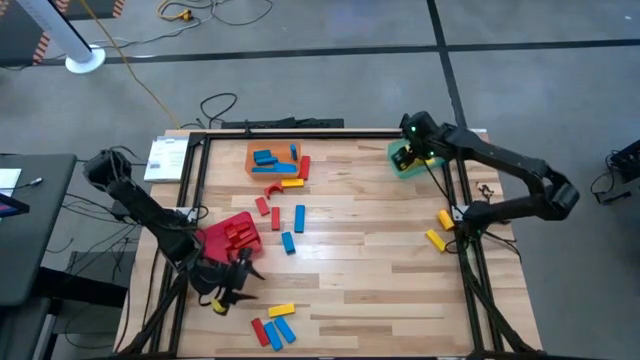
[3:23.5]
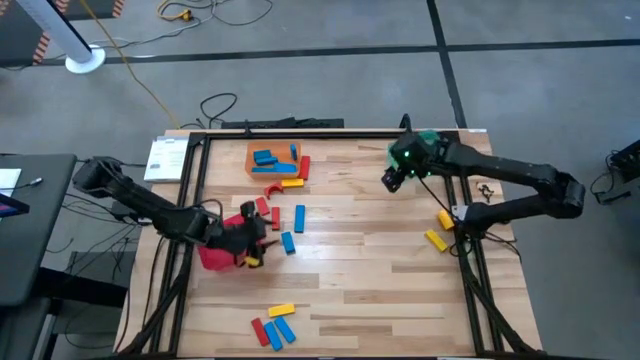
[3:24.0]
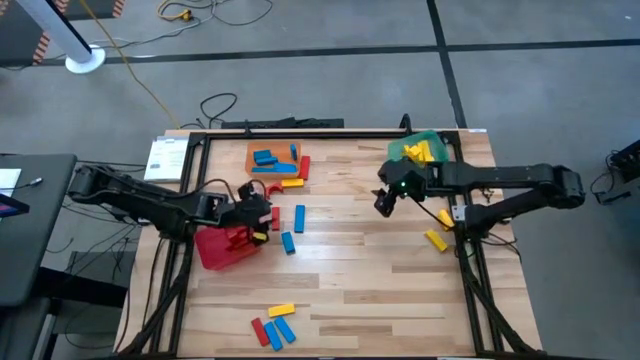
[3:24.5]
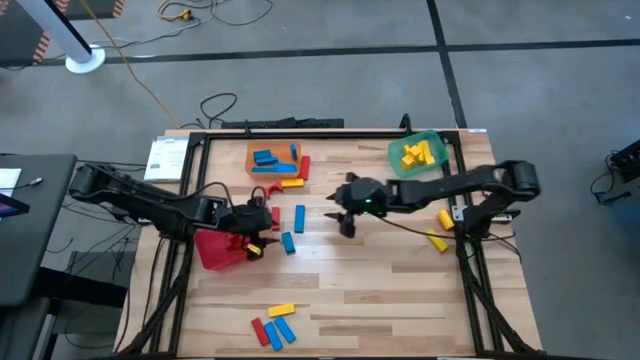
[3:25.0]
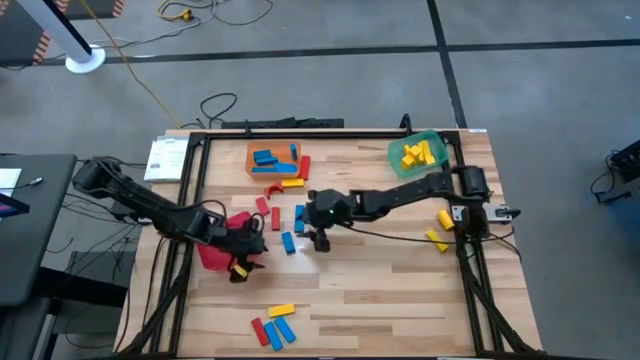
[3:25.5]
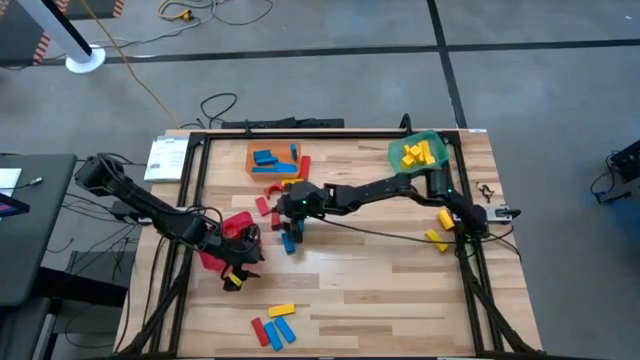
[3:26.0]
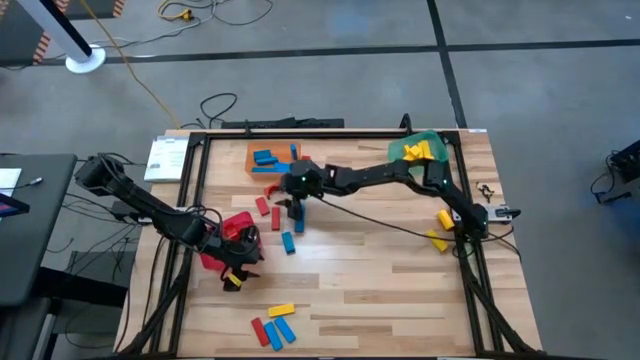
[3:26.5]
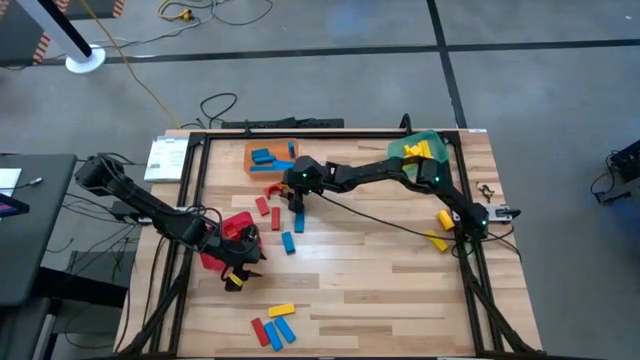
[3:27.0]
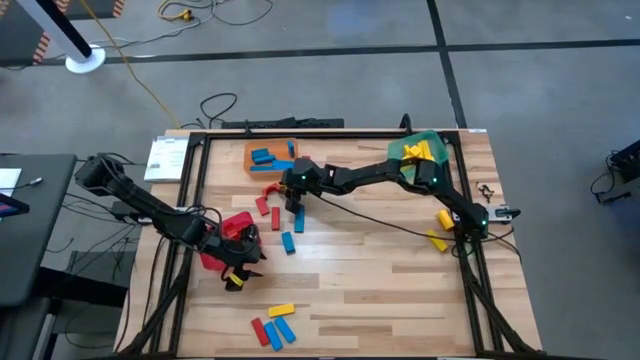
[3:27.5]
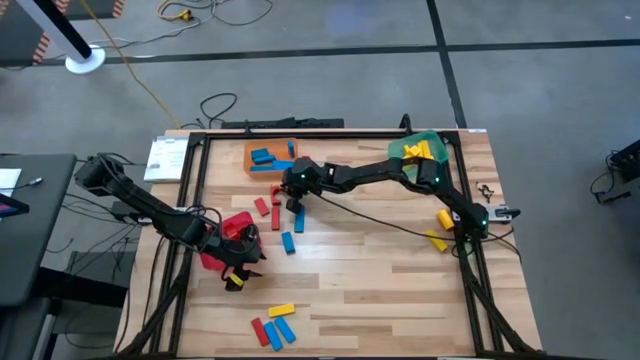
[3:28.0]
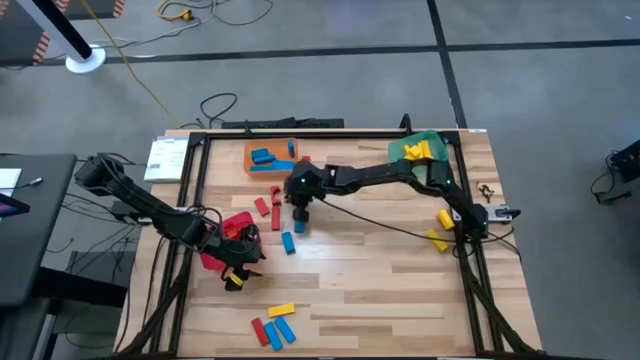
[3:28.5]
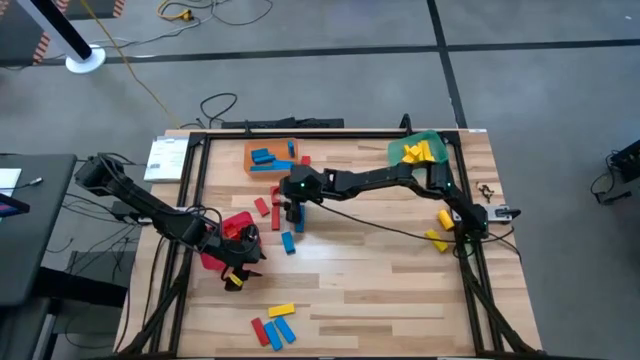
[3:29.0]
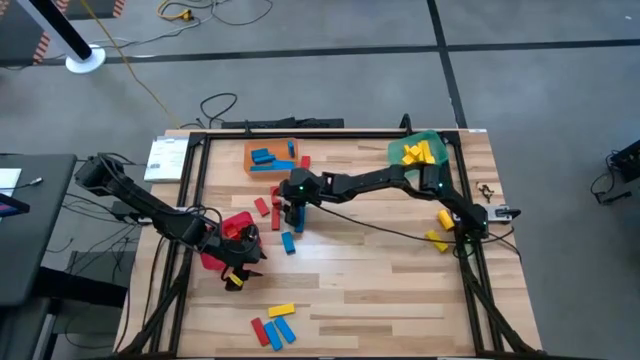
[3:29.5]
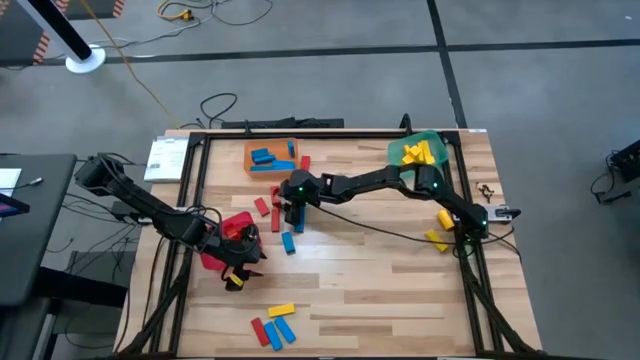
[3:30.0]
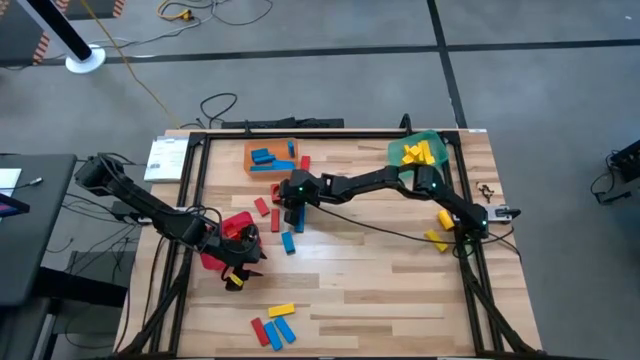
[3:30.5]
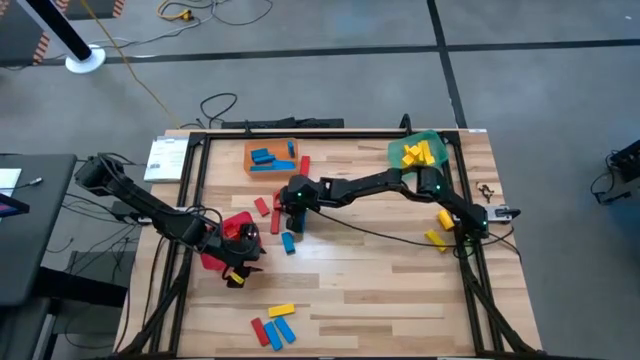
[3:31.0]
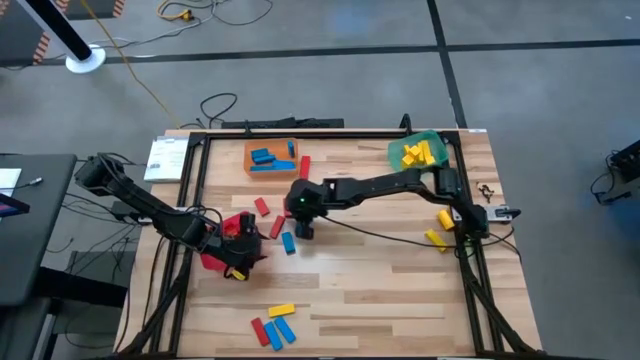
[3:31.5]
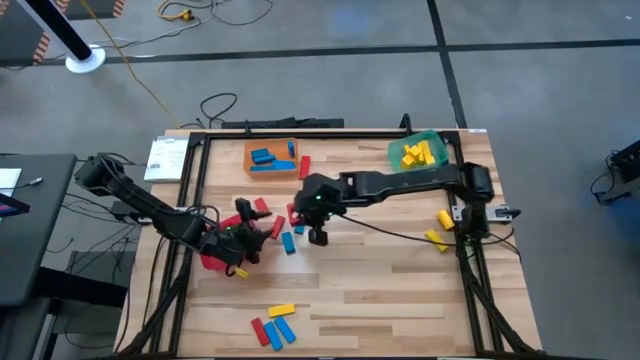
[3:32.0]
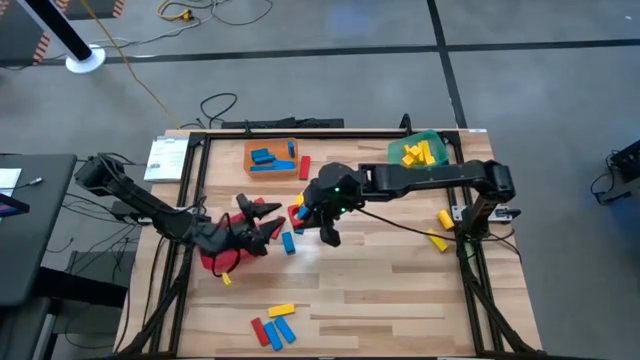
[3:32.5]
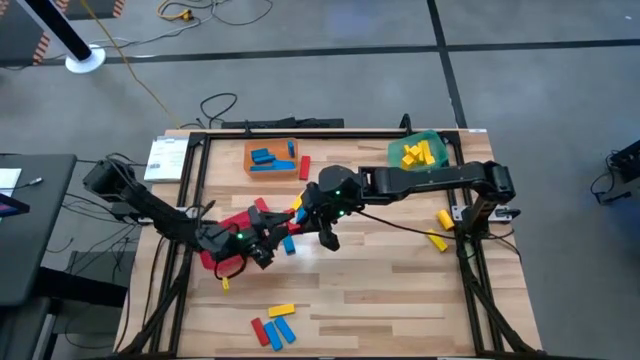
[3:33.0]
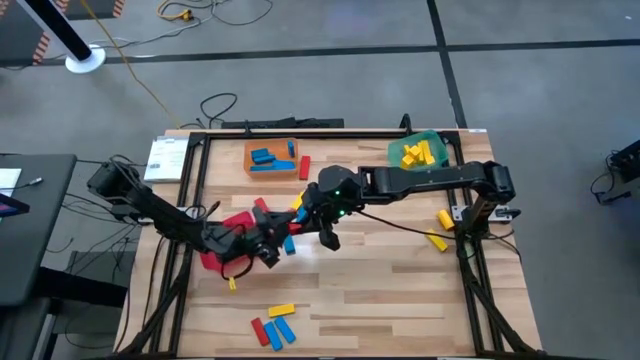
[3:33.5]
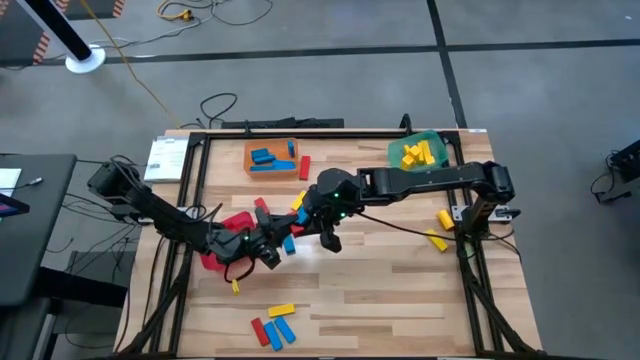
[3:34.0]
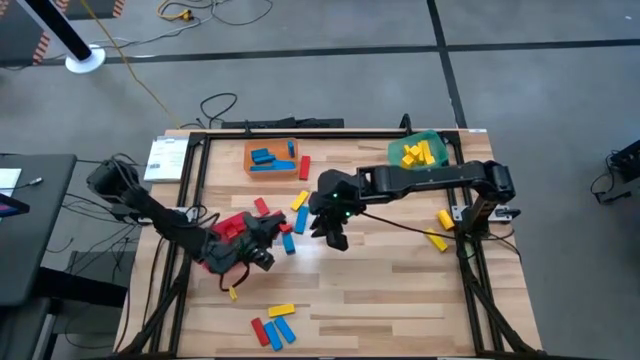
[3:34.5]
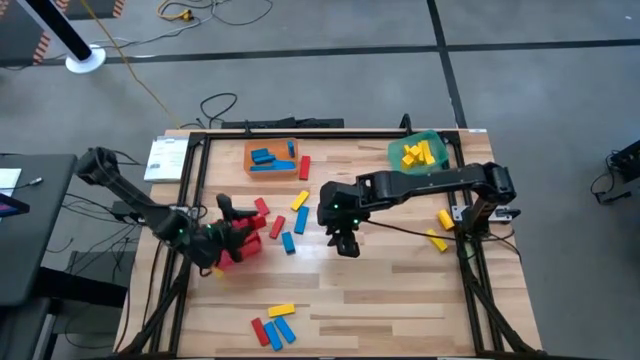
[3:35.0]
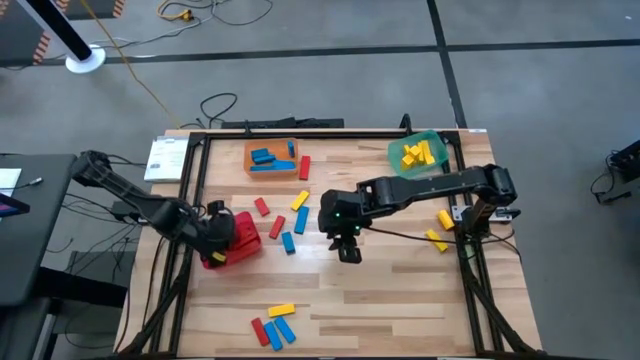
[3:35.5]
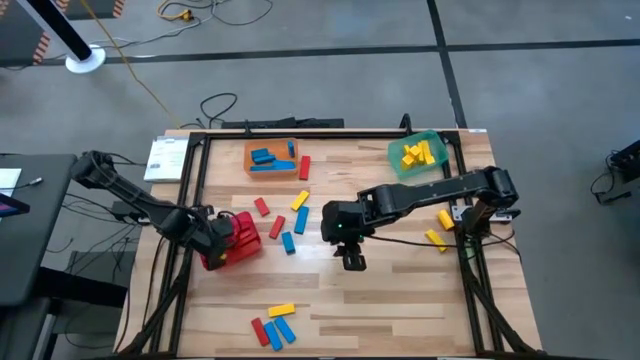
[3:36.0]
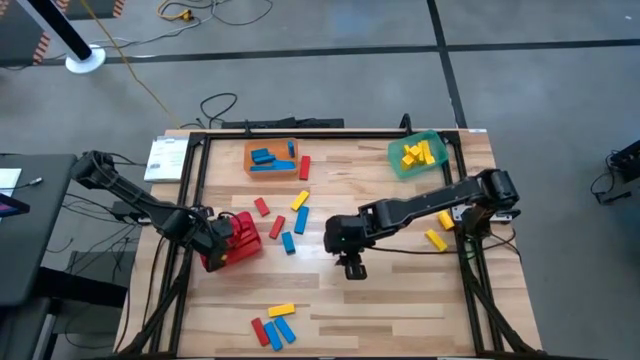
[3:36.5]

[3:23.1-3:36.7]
Task: Sort blocks
Put the red block into the red bin

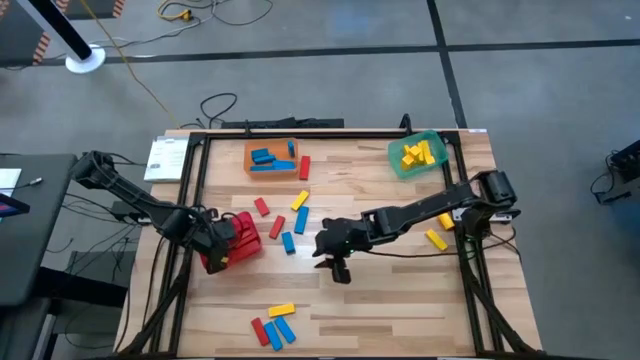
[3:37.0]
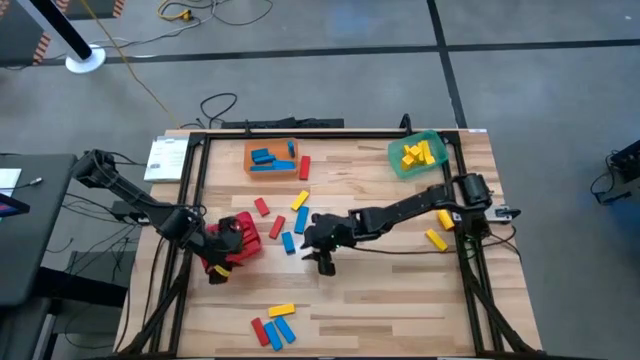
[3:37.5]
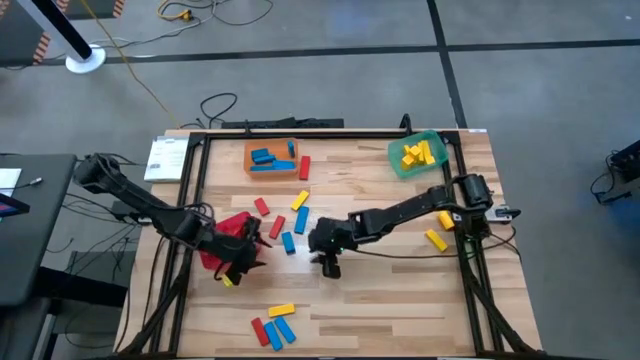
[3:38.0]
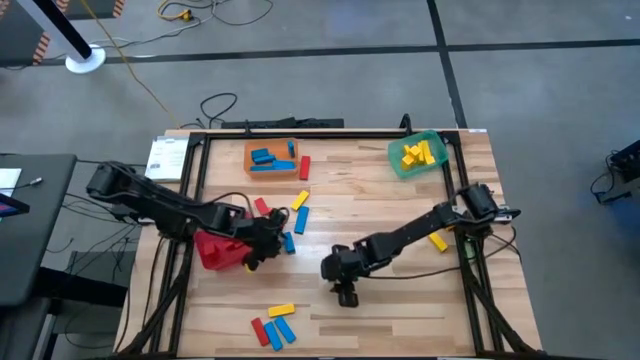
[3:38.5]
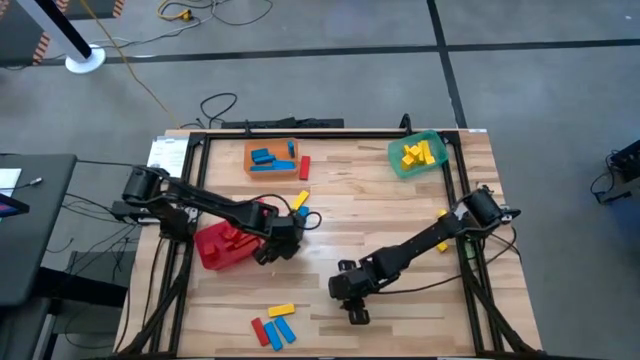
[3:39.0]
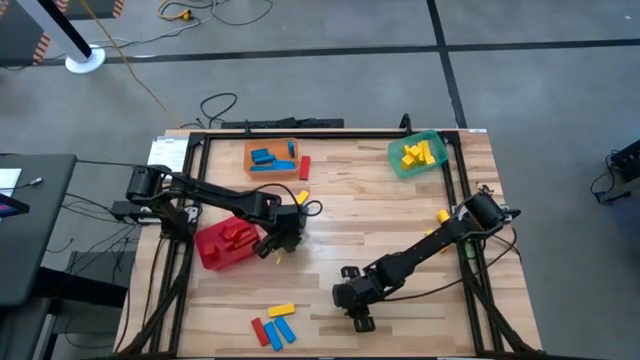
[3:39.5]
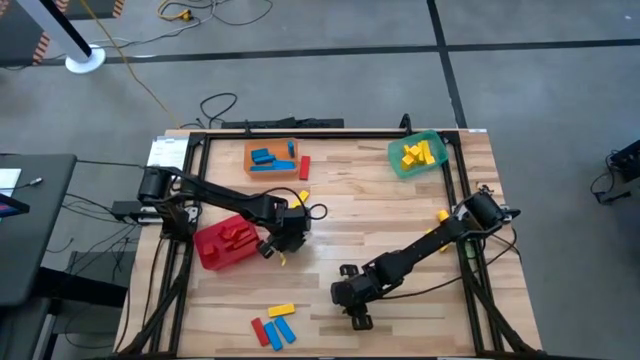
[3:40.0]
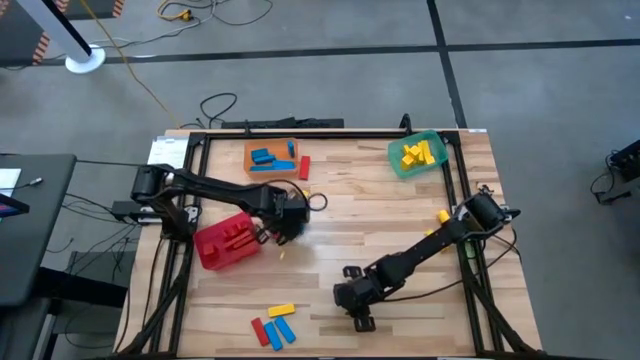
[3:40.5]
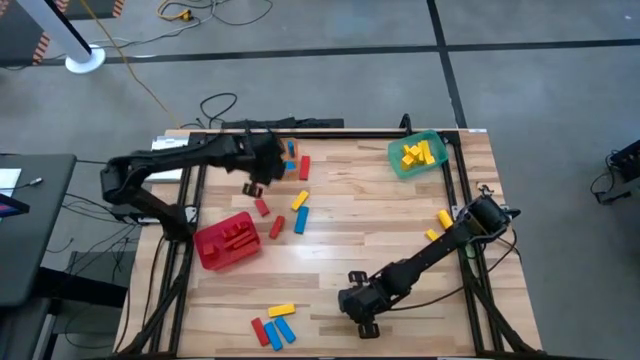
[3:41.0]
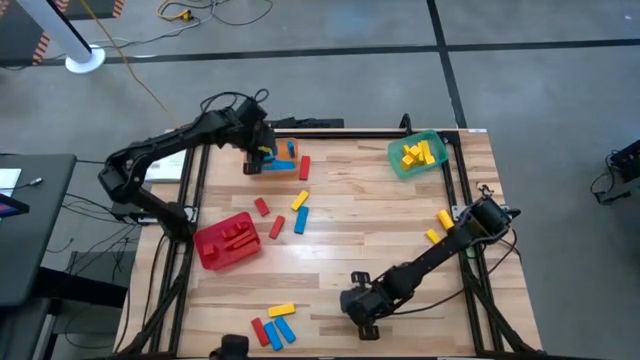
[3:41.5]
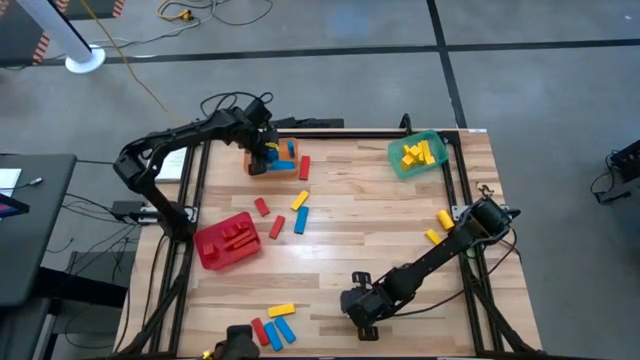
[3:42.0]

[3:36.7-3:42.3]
Put the blue block into the orange bin

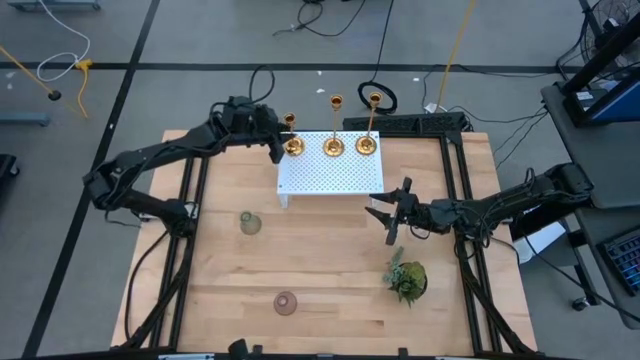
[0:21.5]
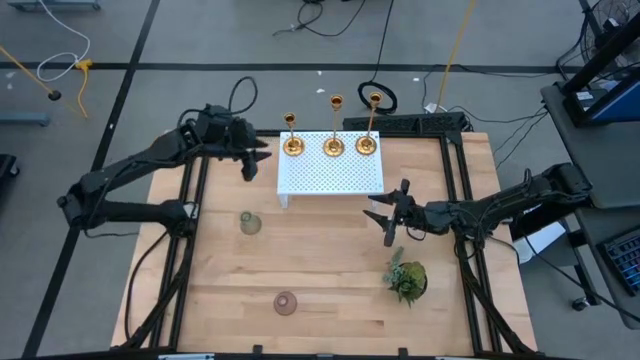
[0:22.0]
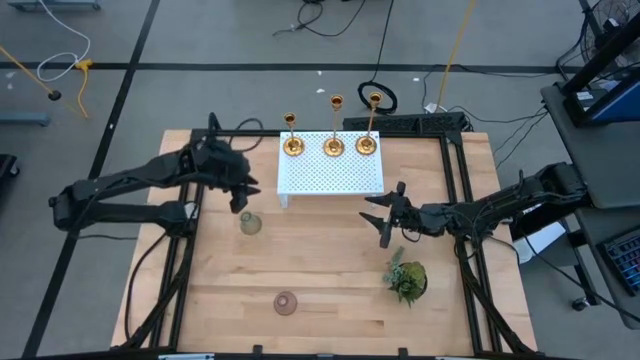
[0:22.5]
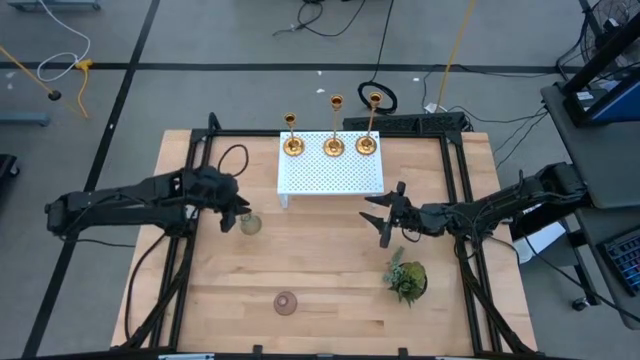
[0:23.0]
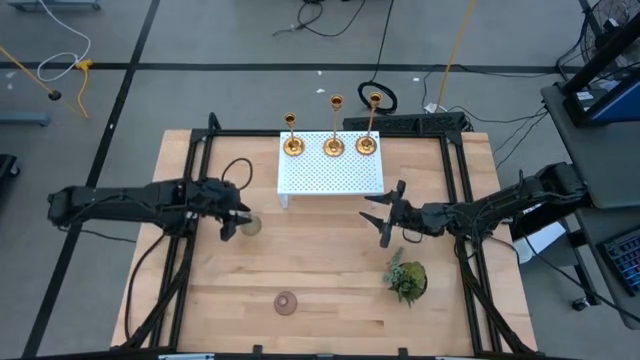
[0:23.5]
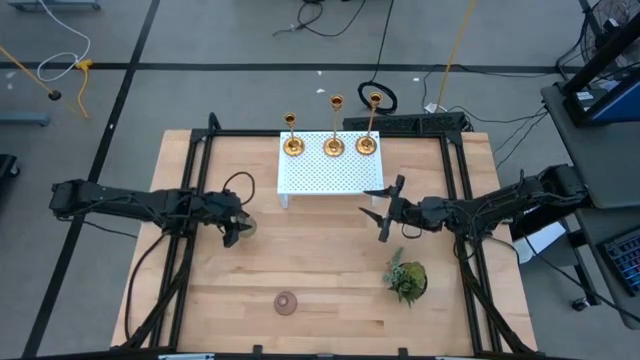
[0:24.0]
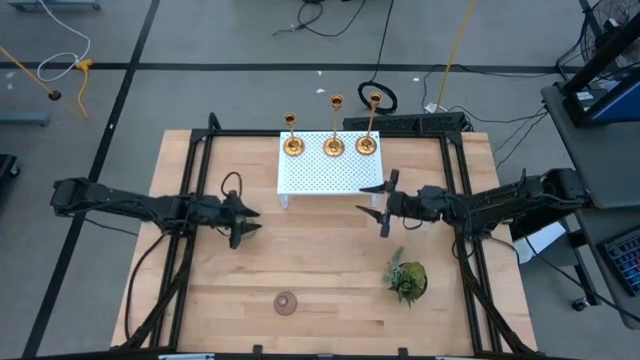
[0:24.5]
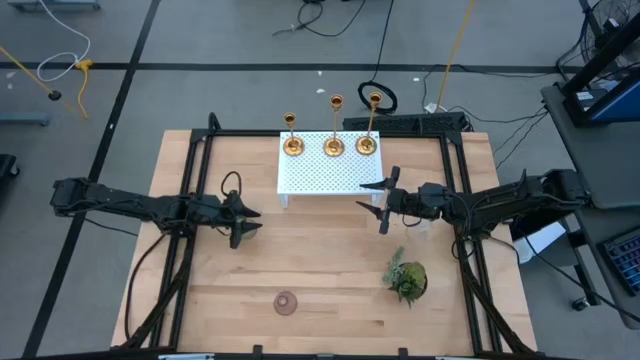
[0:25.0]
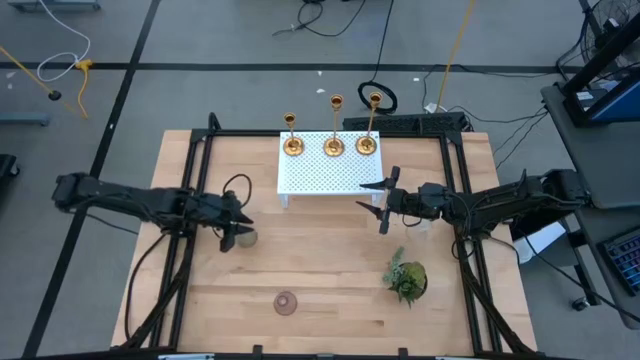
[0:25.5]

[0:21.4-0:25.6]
Task: Pick & Place candle stick holders
Put the gray candle holder on the shelf
